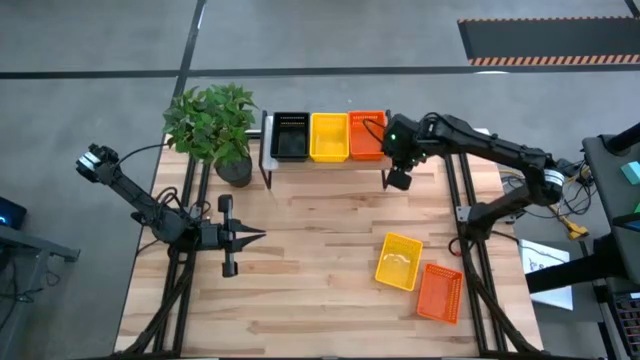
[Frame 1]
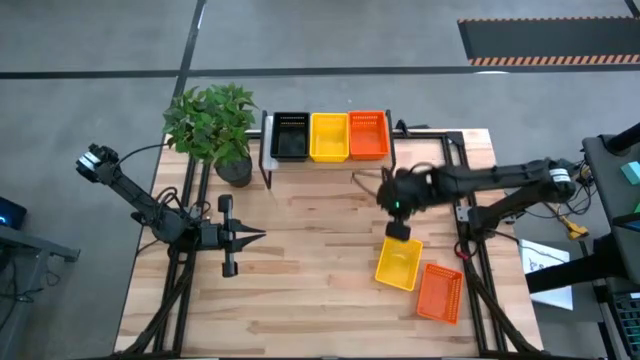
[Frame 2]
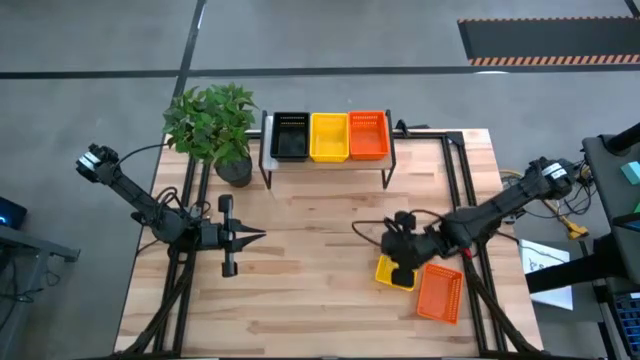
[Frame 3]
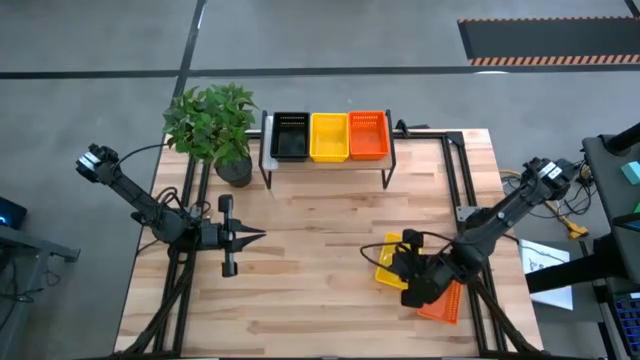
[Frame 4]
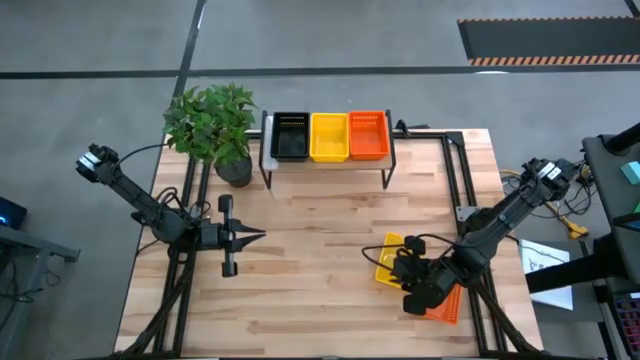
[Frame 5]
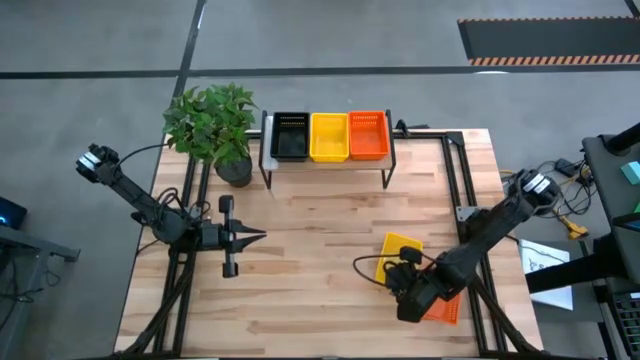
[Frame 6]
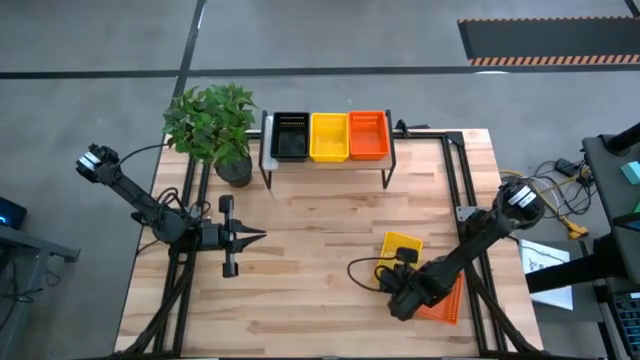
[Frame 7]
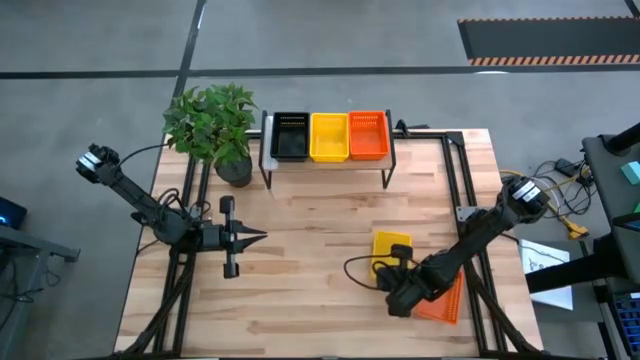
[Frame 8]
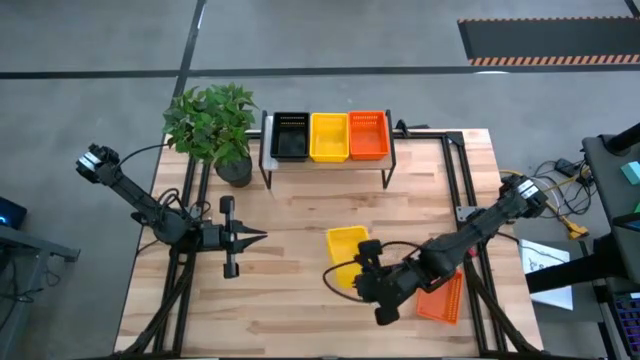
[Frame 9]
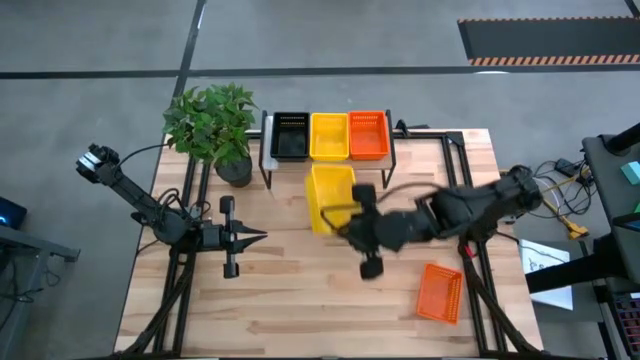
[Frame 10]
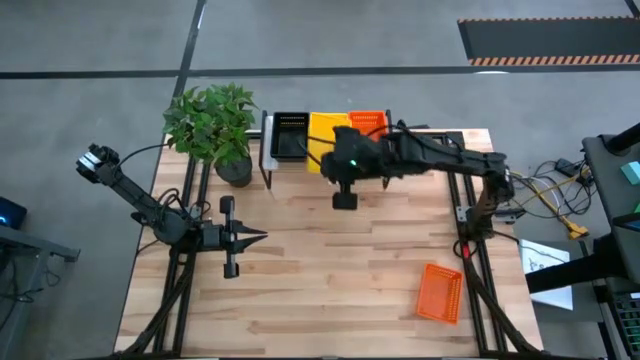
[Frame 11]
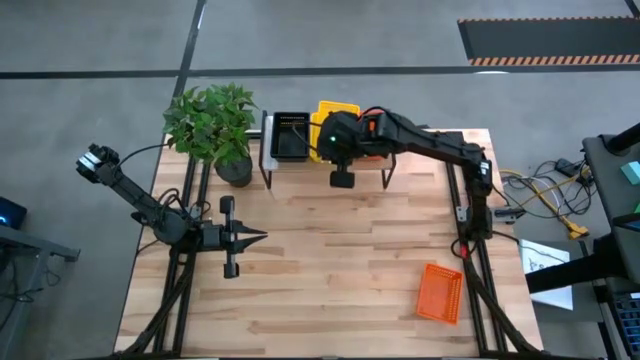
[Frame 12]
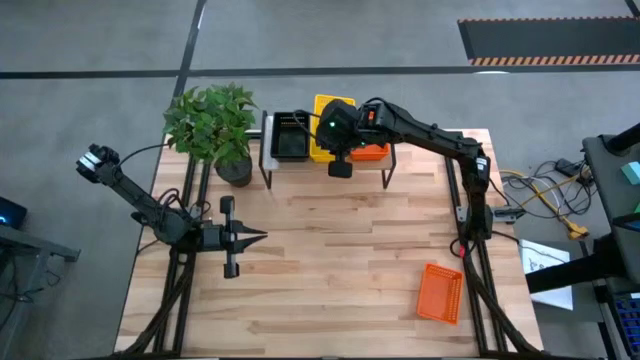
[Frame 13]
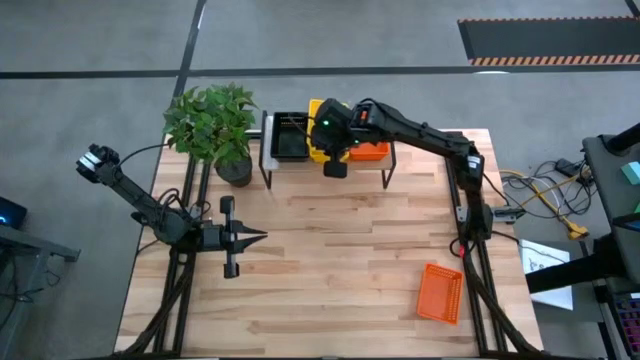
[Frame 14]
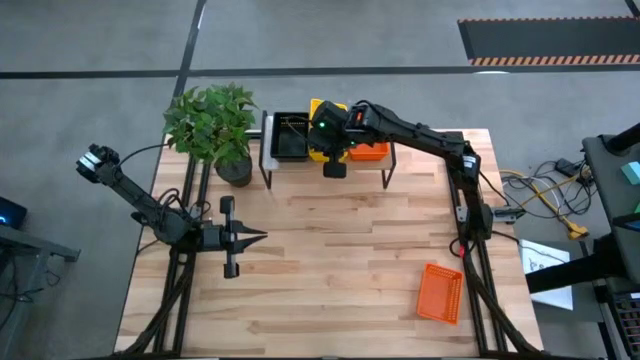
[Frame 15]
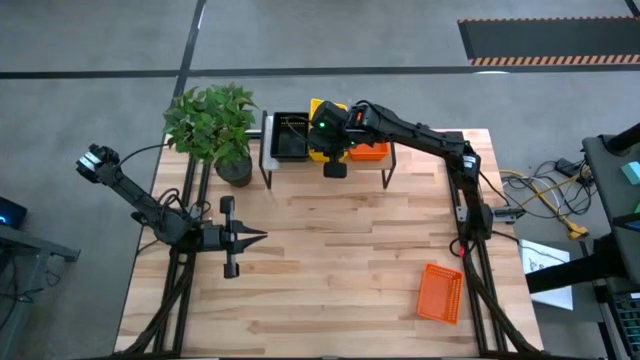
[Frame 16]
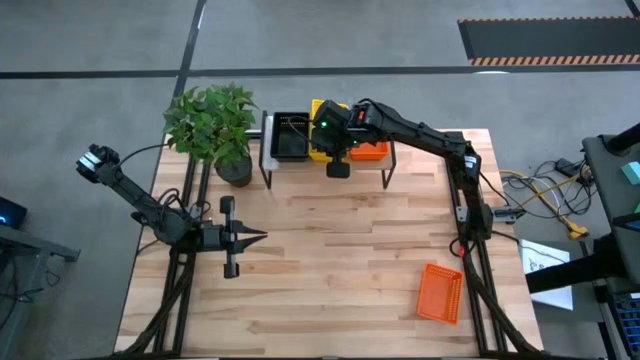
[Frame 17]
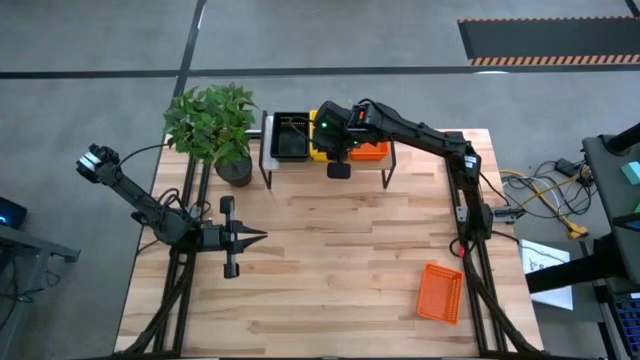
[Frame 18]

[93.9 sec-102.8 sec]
Task: Stack baskets on shelf by color
Stack the yellow bin on top of the other yellow bins on the shelf

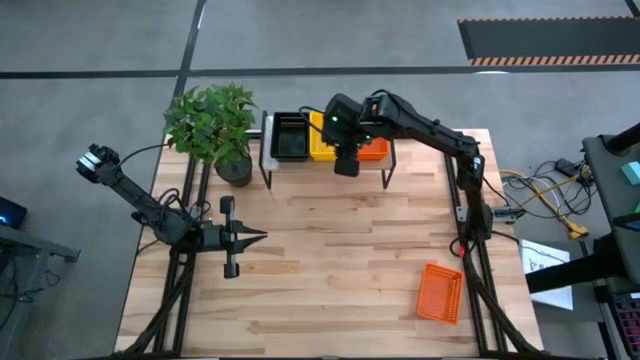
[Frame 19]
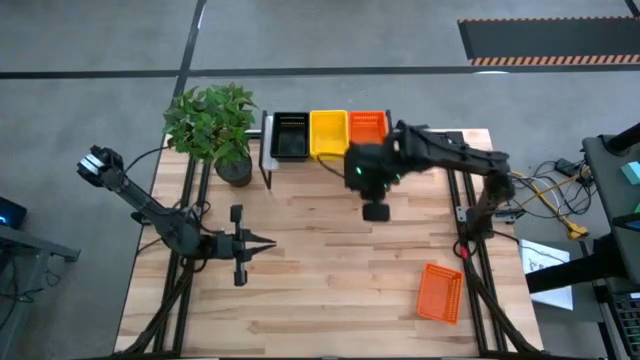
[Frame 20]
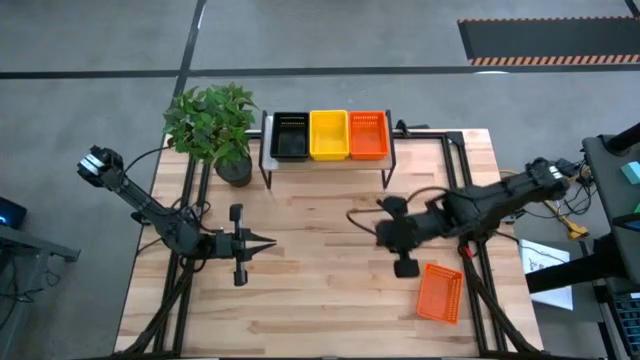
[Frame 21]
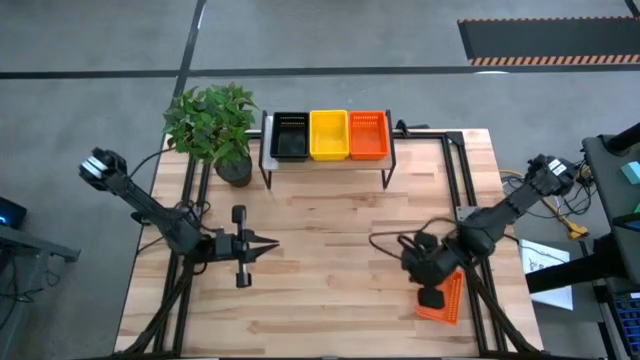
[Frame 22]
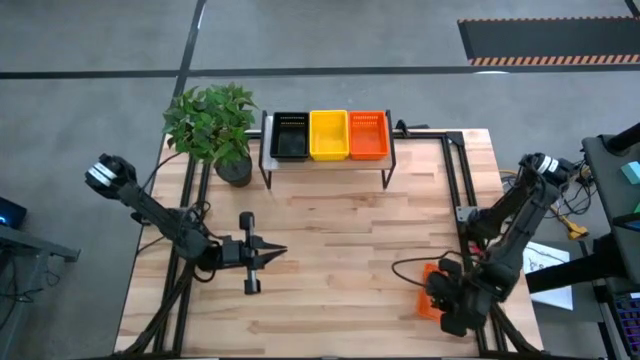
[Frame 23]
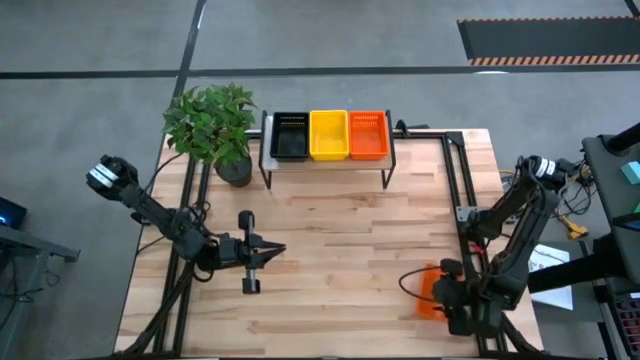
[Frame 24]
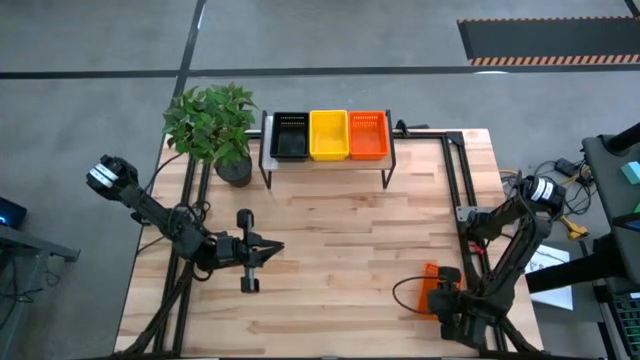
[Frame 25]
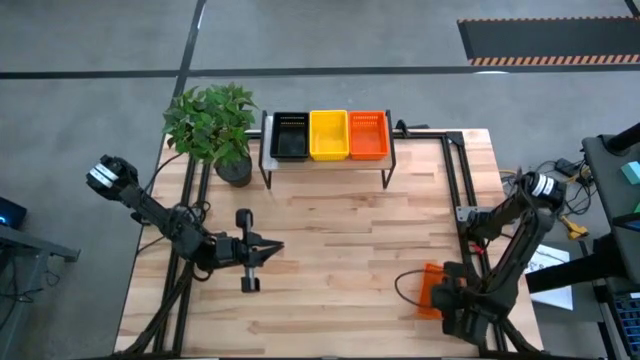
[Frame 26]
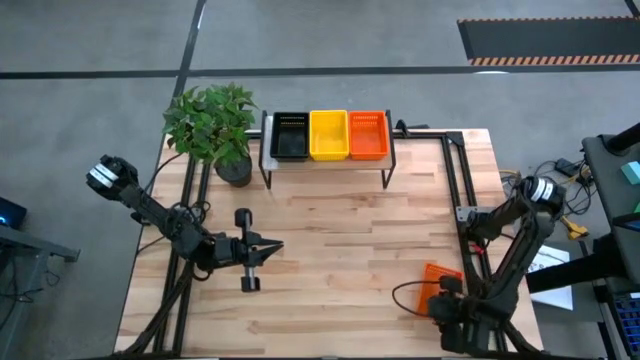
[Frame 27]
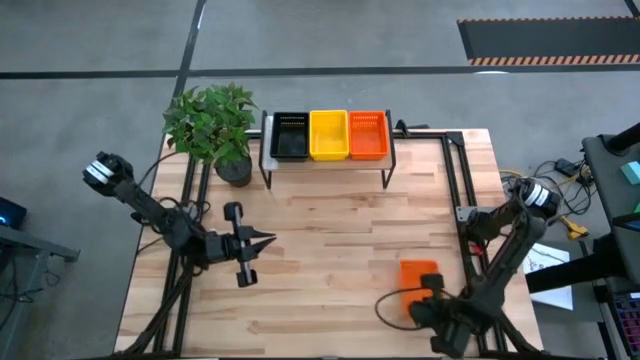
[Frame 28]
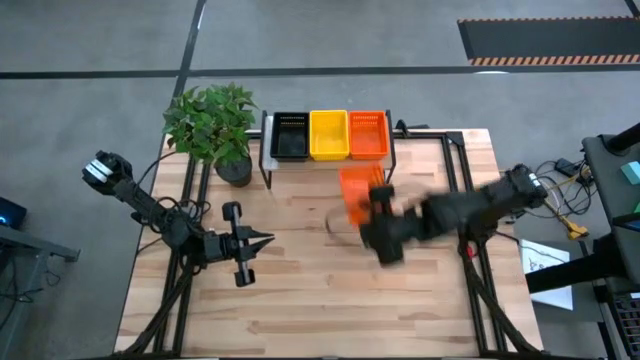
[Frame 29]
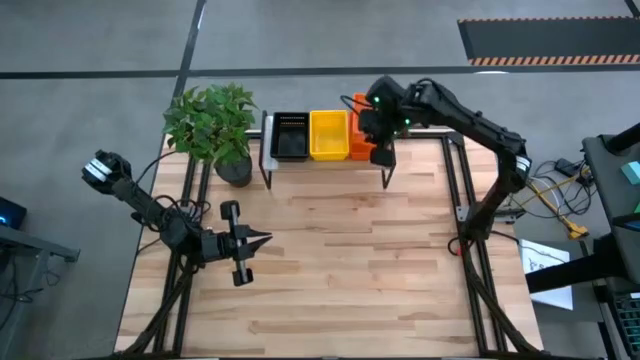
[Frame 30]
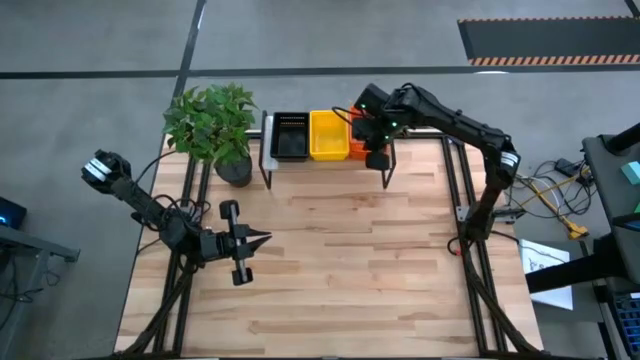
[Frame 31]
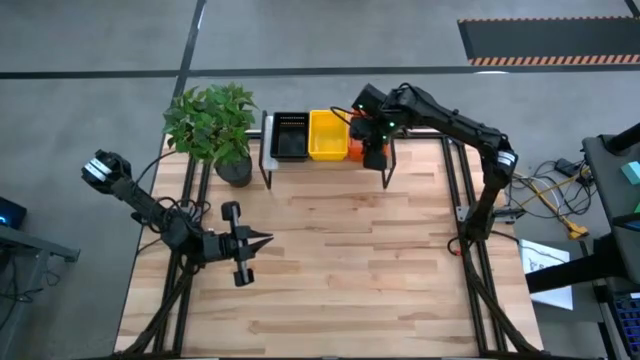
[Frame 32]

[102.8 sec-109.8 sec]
Stack the orange bin on top of the other orange bins on the shelf

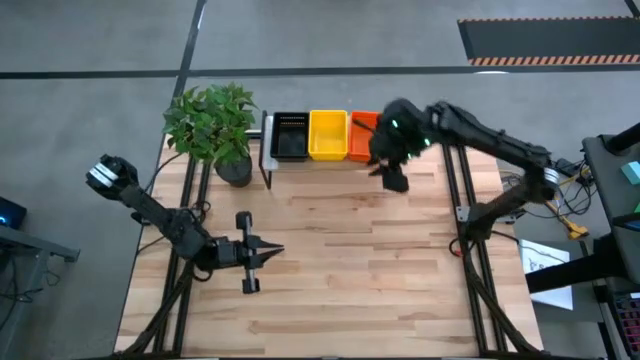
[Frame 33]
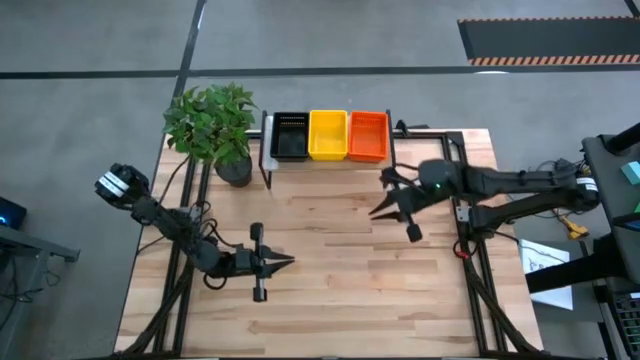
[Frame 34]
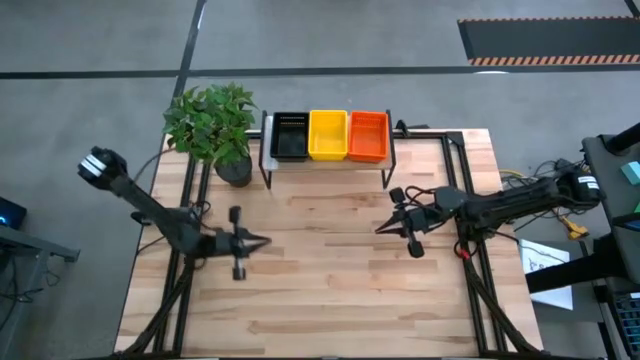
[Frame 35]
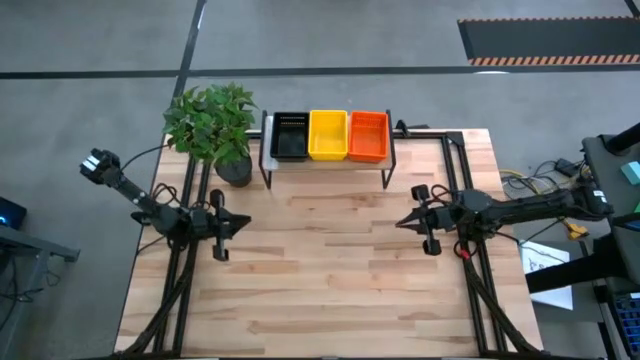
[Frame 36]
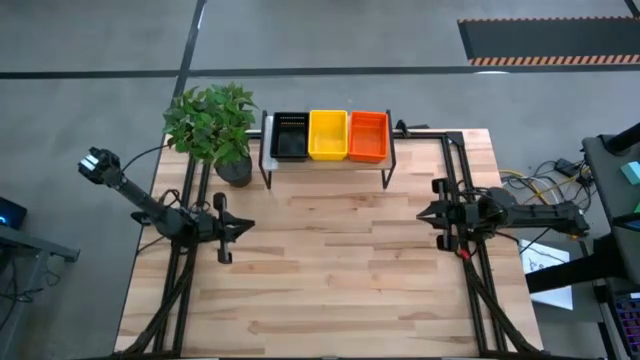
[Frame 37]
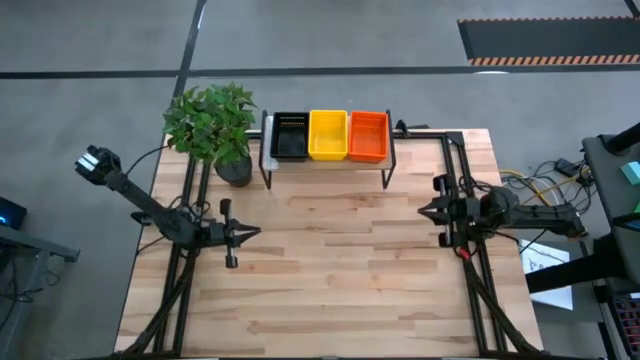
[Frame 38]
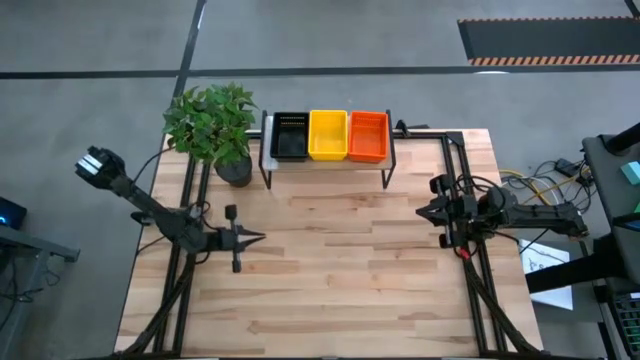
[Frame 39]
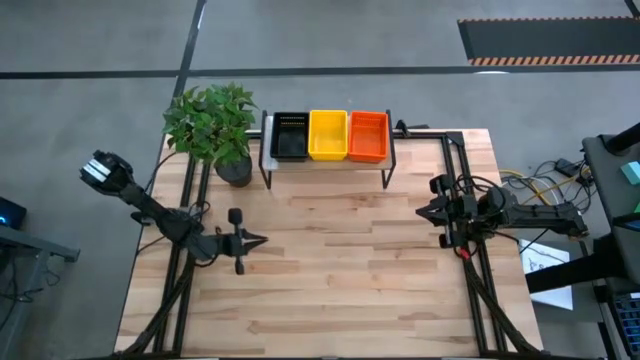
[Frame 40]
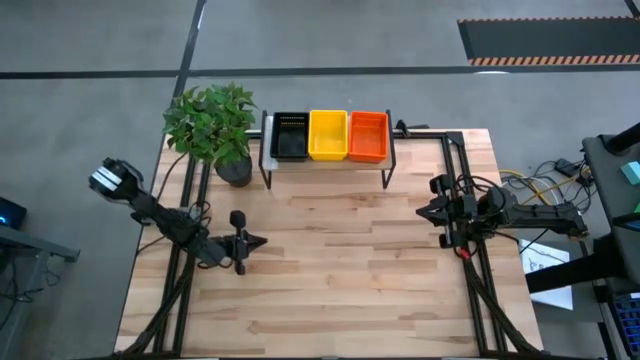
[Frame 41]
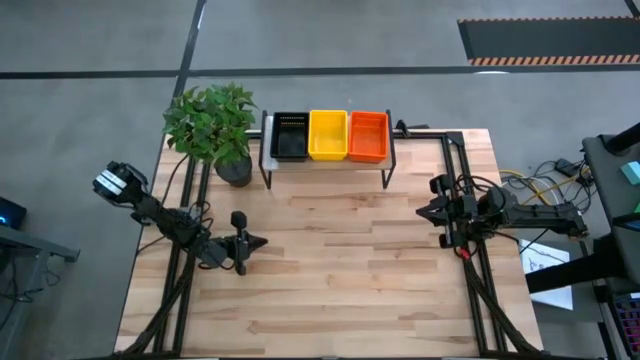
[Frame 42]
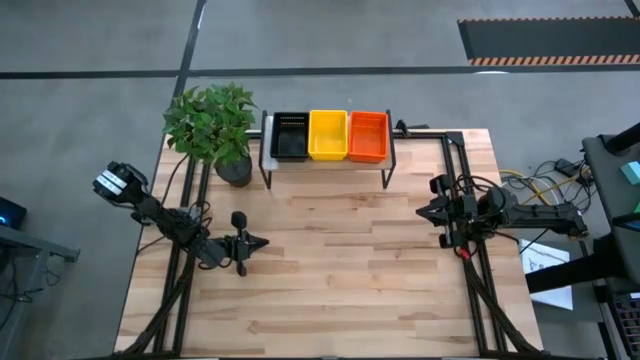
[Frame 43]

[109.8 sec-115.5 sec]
Return to Home Position
